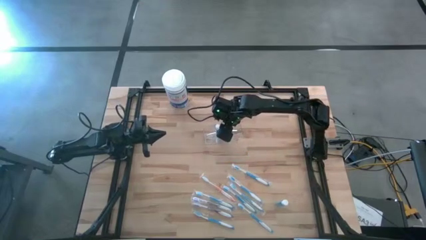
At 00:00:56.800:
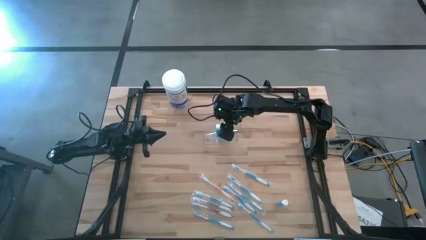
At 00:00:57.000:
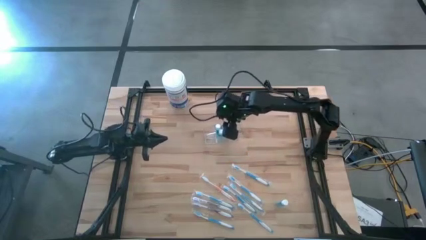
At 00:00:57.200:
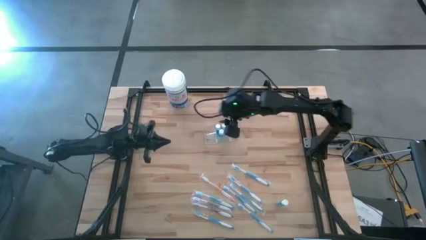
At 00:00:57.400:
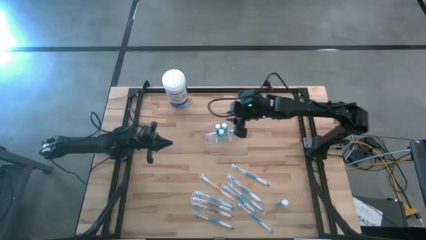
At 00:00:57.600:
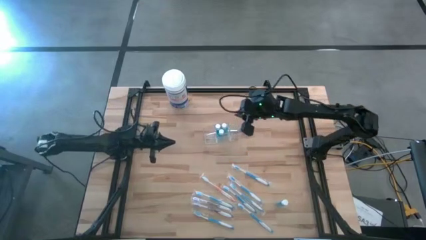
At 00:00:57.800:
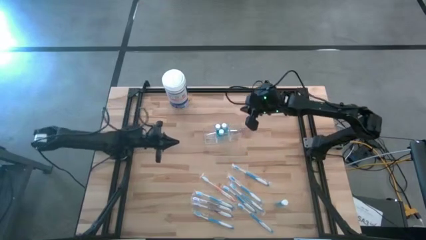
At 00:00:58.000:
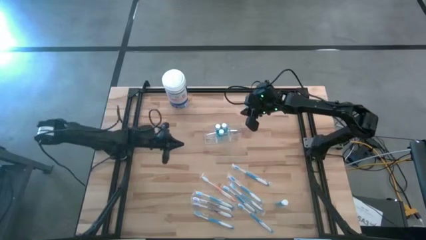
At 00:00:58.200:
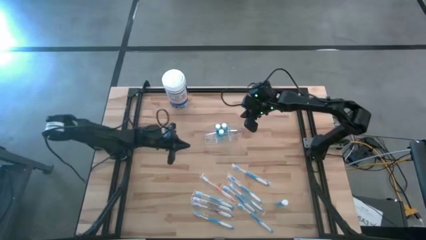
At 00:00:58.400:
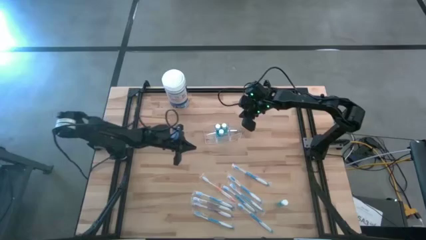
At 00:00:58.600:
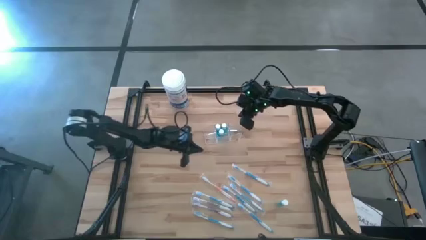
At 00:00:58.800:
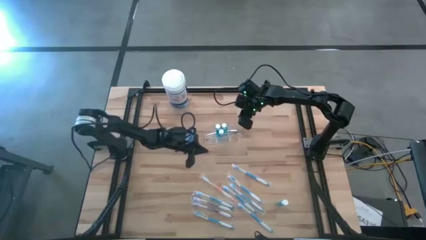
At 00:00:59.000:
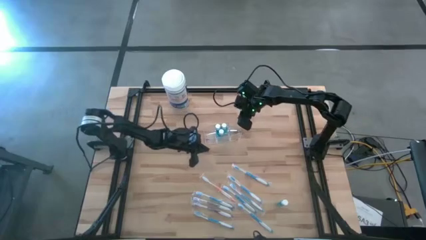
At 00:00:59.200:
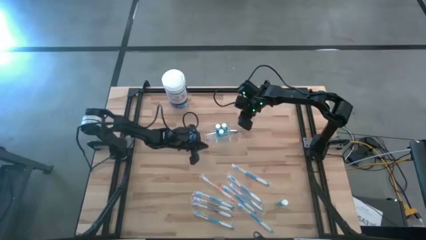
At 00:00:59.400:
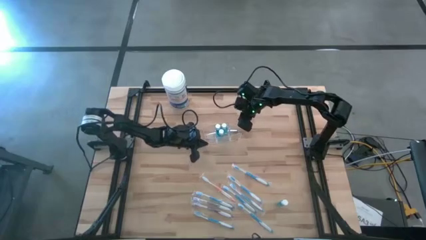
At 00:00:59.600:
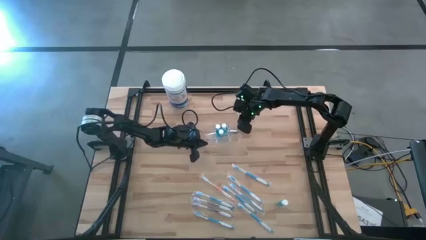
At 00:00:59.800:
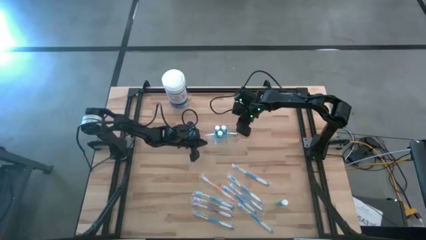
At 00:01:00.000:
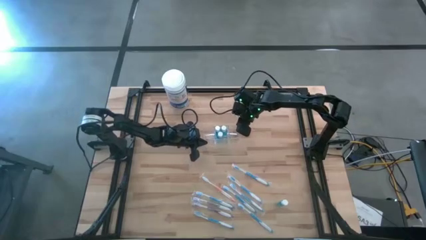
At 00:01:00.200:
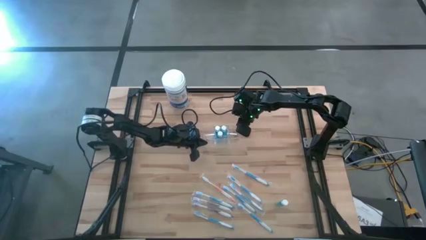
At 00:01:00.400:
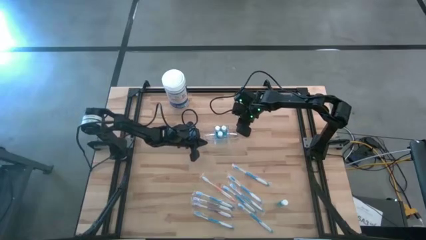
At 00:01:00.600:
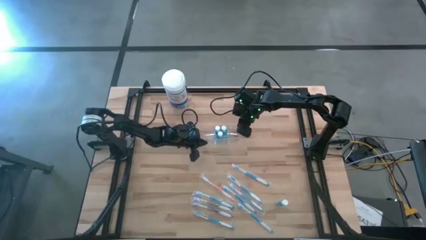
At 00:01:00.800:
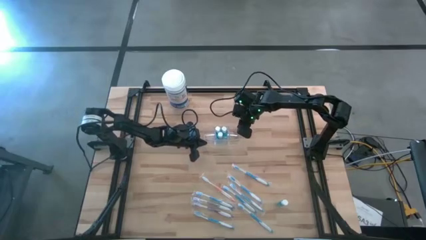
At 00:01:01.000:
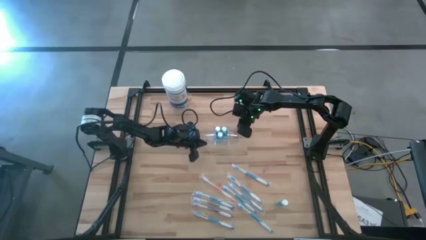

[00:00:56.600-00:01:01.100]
Task: Pick & Place toothbrushing station
Adjust the transparent organizer

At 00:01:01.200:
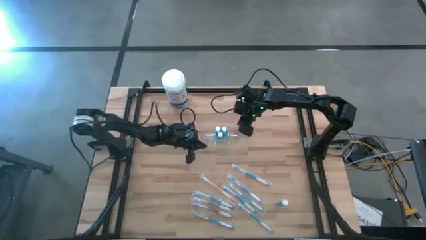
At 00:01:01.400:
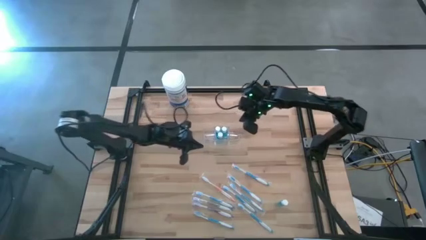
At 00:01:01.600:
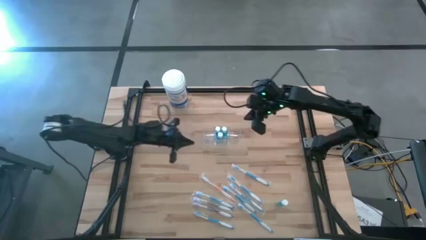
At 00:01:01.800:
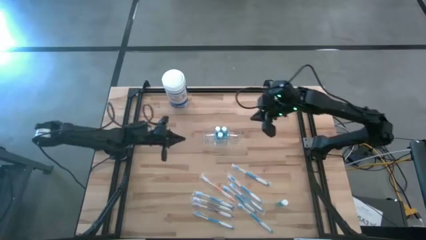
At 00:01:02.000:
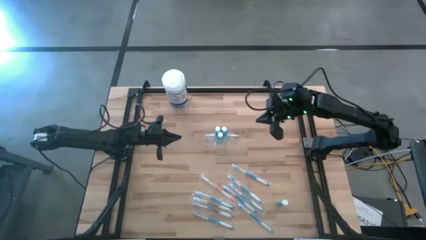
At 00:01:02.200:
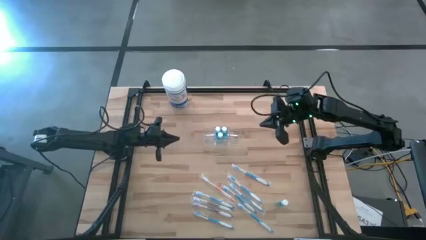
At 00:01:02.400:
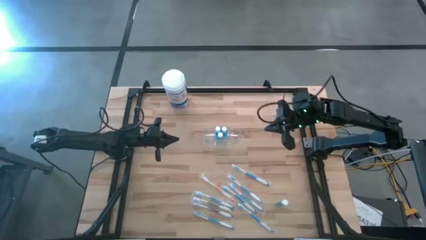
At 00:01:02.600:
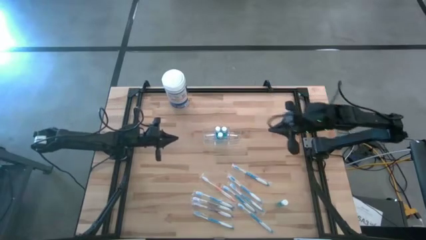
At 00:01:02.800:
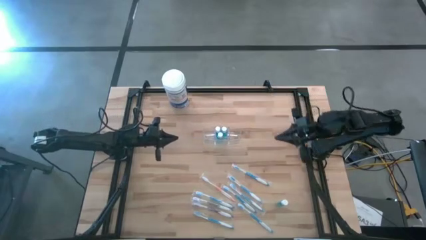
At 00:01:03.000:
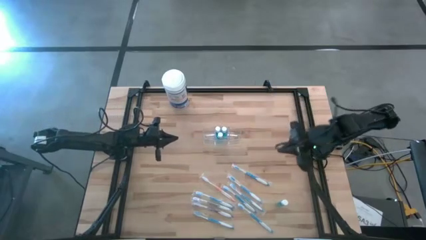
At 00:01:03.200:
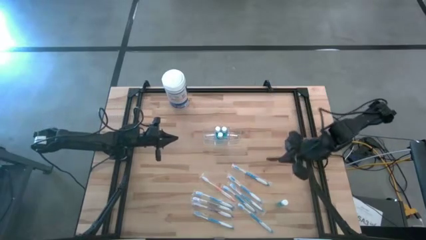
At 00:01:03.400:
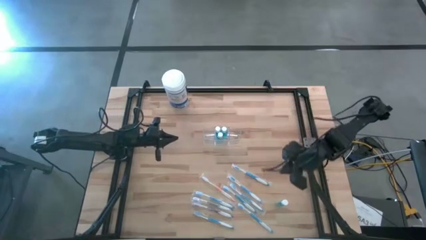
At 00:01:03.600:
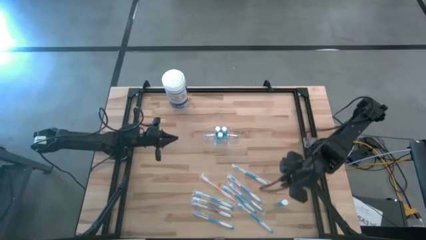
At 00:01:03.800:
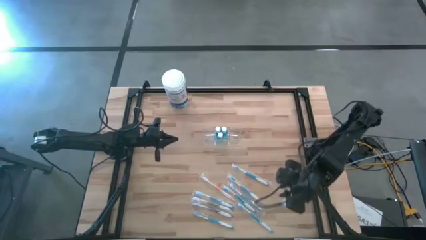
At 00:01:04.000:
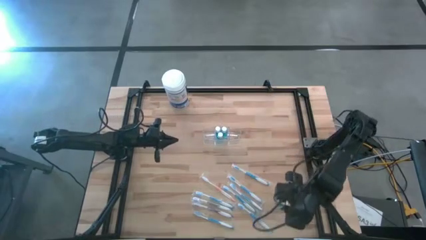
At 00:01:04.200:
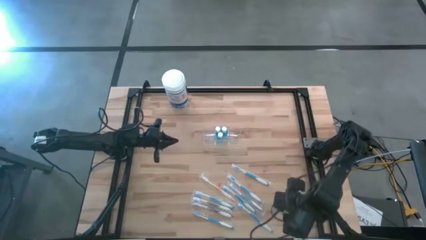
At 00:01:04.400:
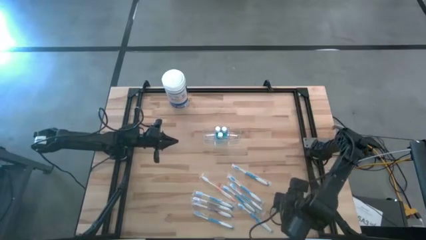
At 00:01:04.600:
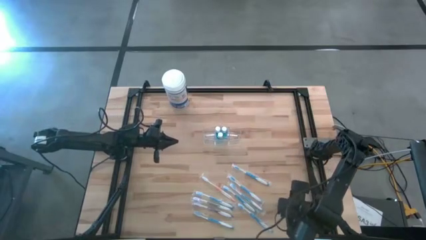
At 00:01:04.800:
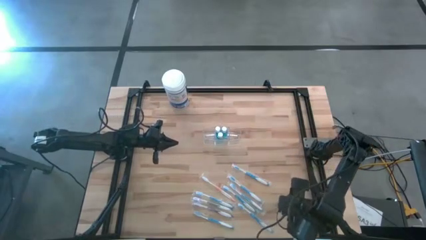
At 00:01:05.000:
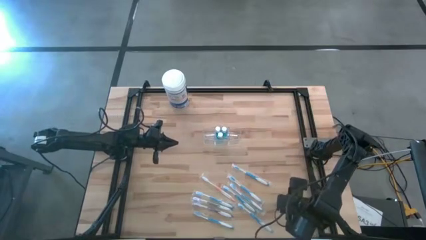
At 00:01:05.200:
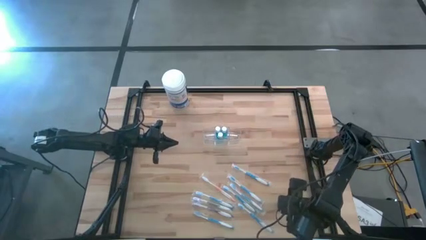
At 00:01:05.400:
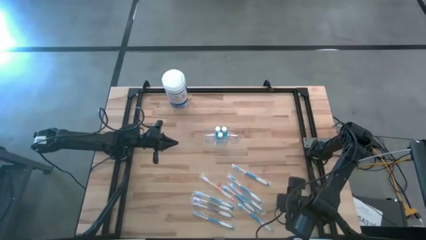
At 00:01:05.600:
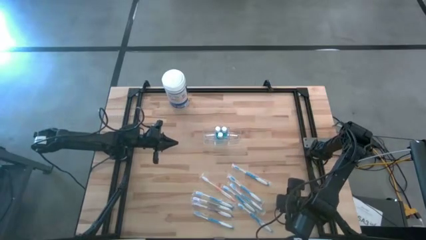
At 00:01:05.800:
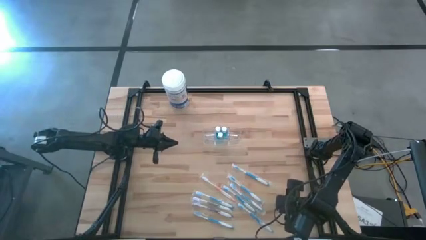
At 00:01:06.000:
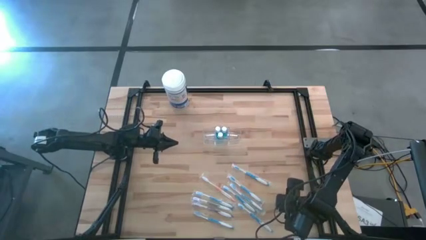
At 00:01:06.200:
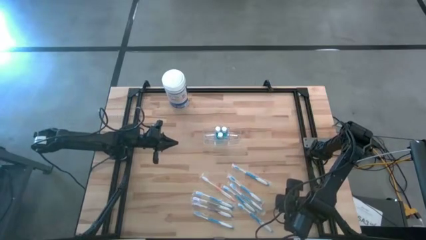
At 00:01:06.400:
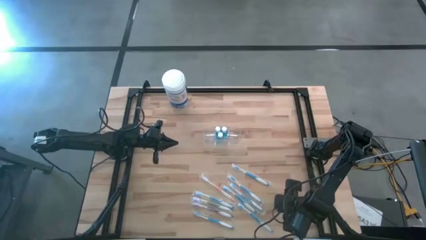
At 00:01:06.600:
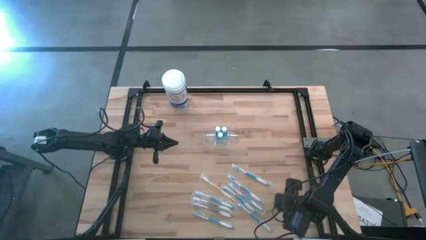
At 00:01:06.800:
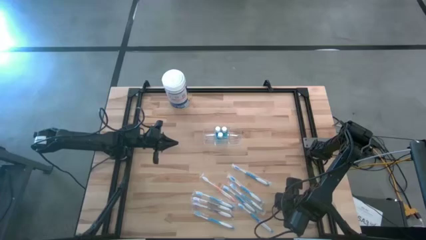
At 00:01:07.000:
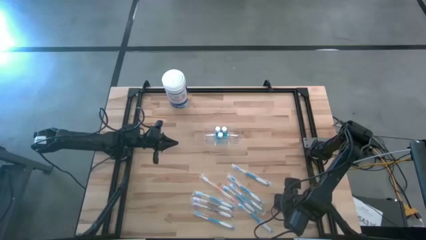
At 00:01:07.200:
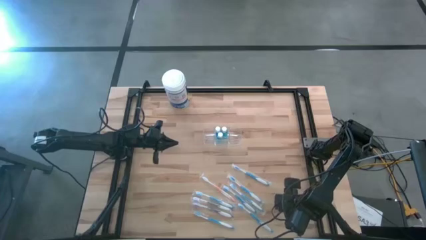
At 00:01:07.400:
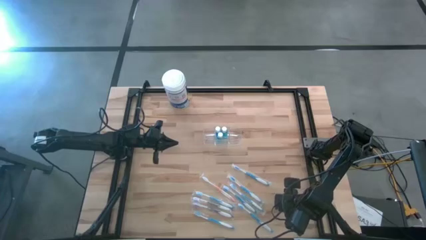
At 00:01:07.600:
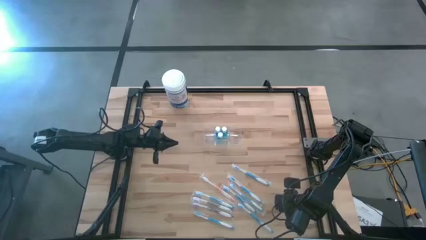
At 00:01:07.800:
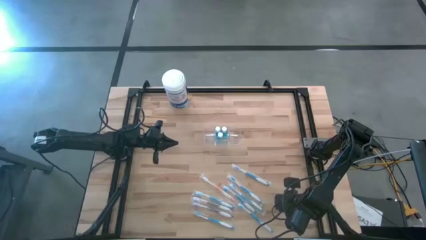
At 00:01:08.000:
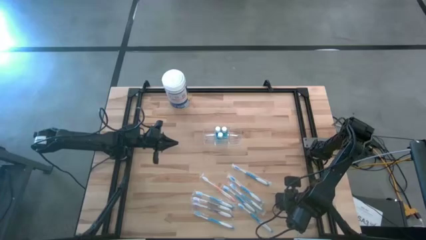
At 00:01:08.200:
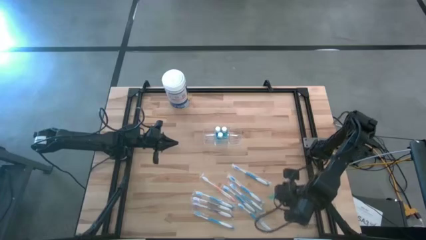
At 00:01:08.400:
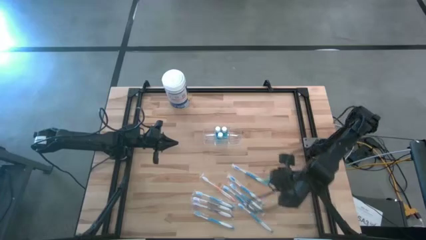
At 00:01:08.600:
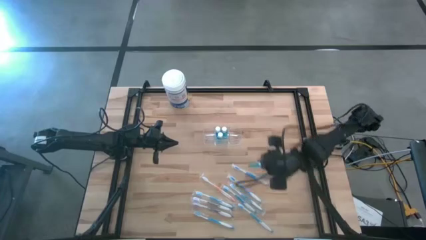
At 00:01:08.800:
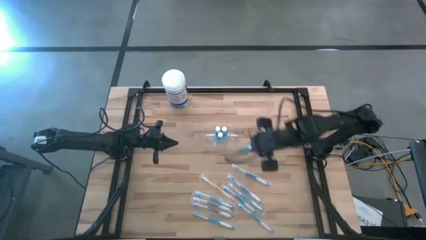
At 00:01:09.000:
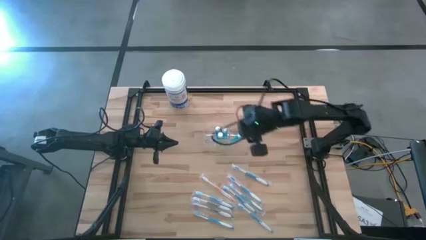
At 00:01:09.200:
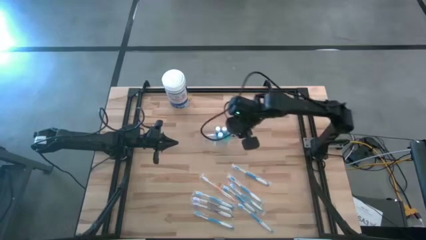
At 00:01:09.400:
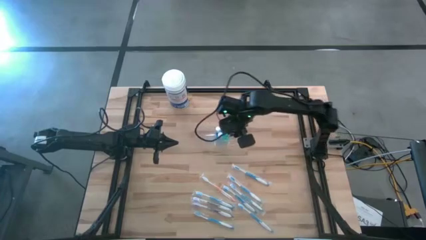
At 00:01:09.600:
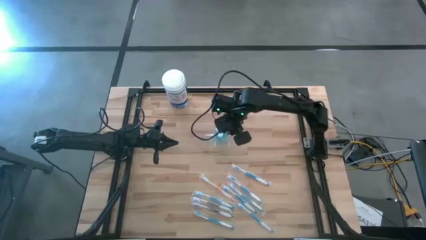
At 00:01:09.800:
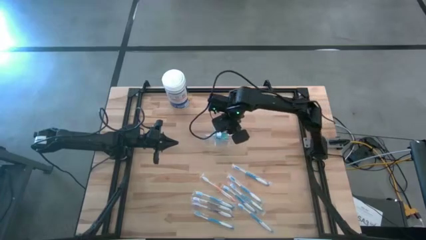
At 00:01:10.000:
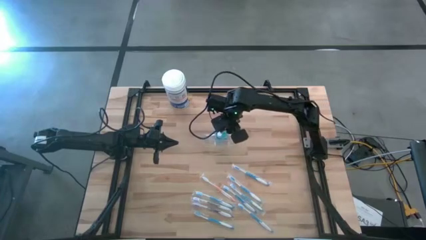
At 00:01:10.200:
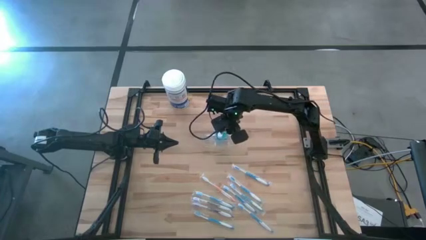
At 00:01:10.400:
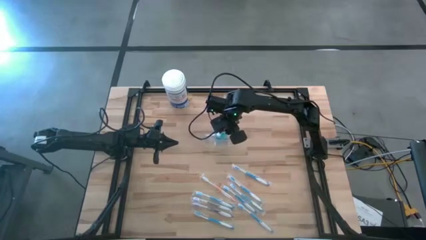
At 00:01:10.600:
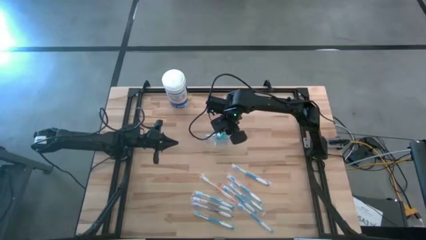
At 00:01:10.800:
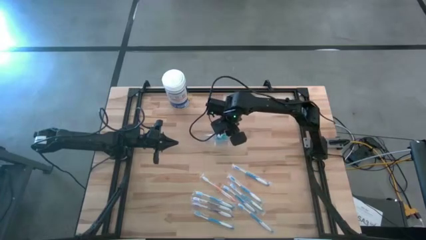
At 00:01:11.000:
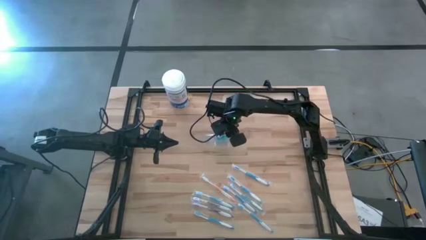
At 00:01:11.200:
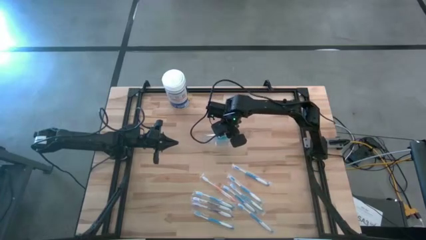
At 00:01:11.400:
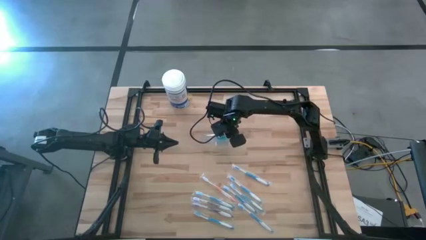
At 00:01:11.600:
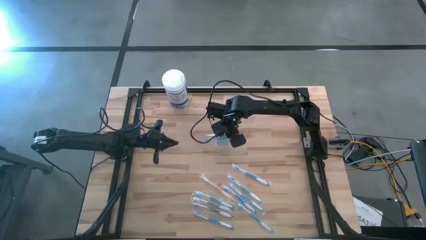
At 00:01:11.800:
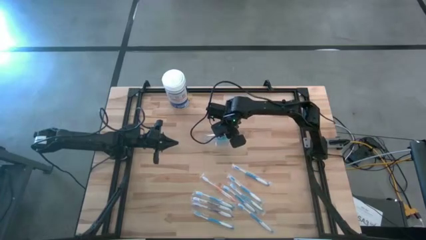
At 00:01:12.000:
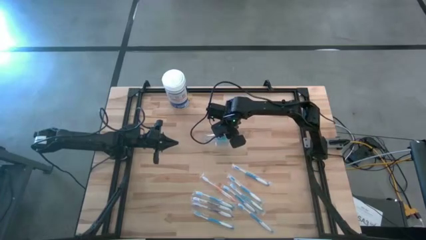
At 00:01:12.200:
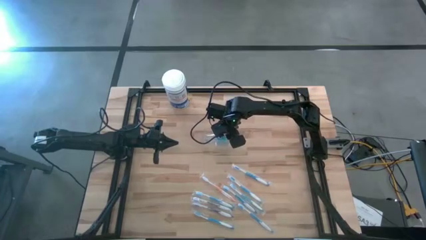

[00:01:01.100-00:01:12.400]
Put the blue mouthwash in the transparent organizer
